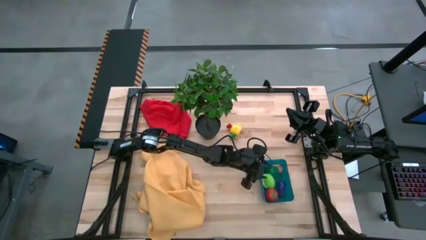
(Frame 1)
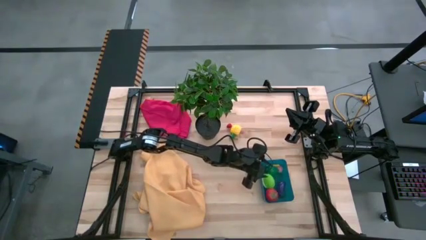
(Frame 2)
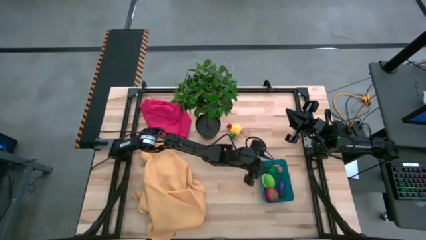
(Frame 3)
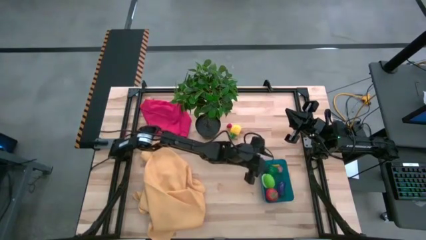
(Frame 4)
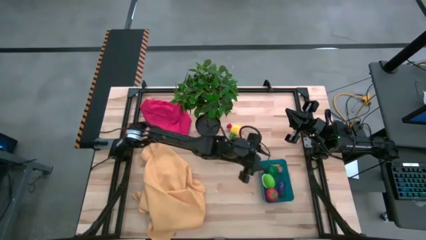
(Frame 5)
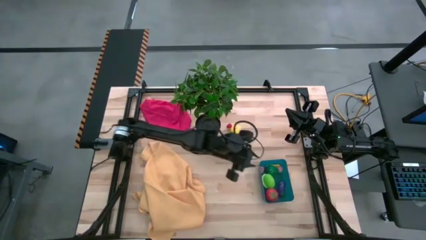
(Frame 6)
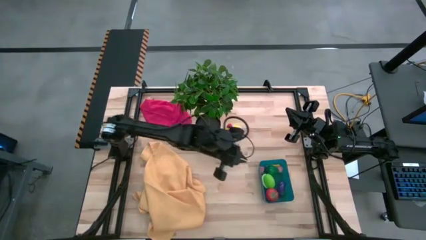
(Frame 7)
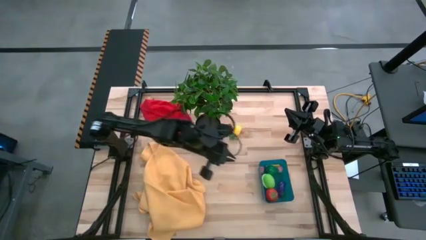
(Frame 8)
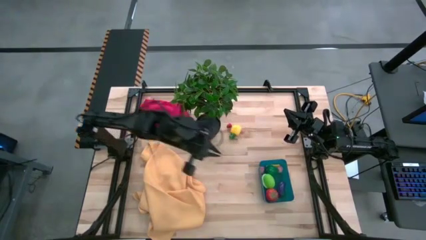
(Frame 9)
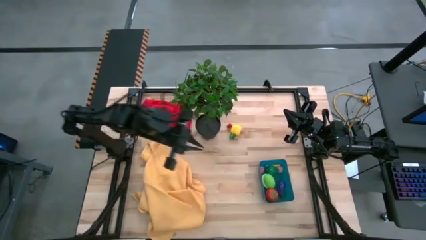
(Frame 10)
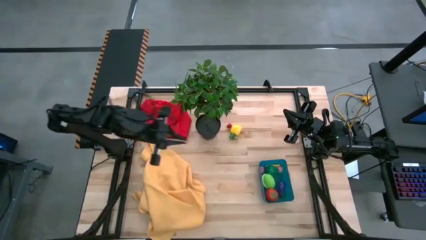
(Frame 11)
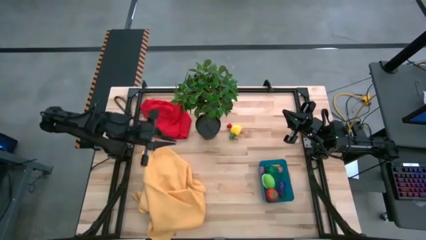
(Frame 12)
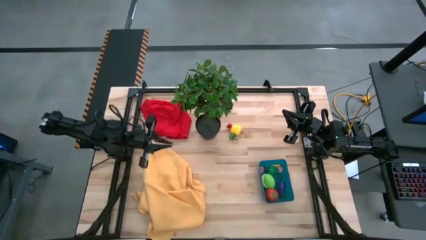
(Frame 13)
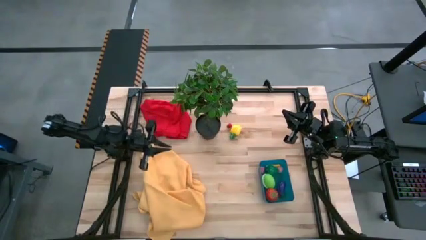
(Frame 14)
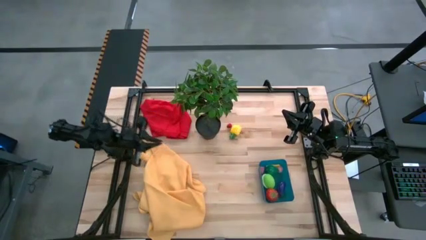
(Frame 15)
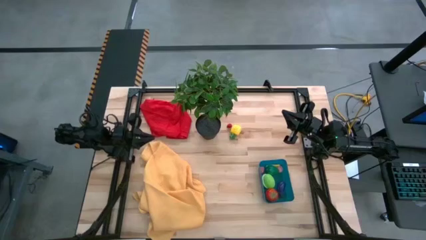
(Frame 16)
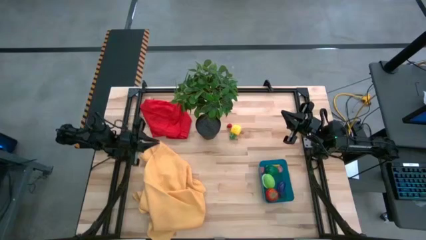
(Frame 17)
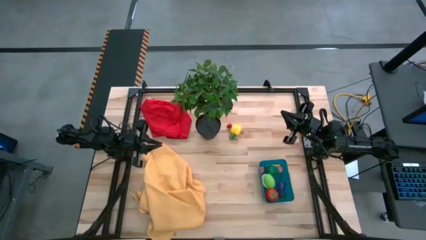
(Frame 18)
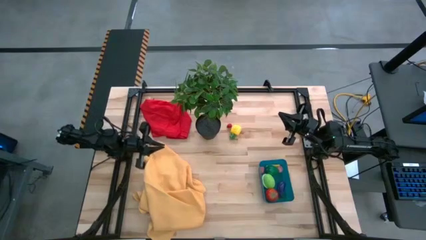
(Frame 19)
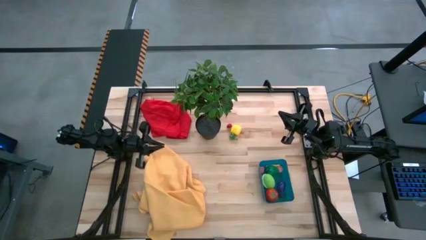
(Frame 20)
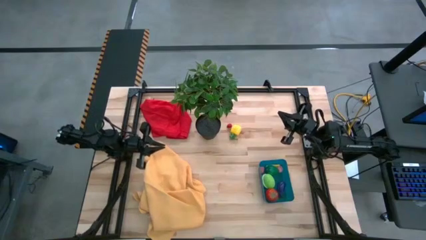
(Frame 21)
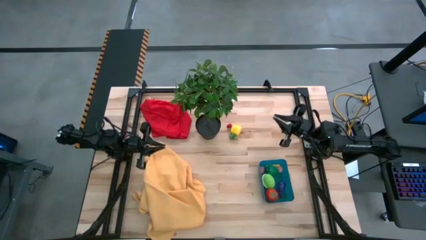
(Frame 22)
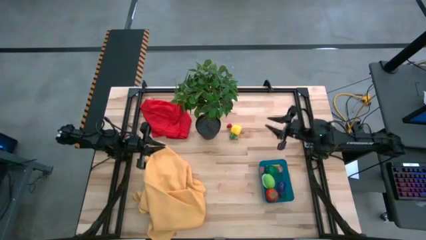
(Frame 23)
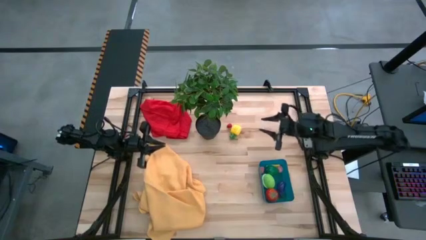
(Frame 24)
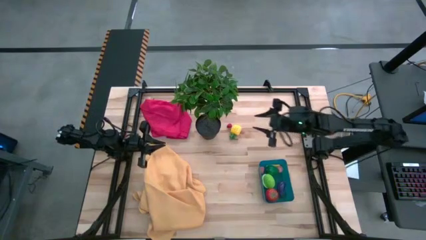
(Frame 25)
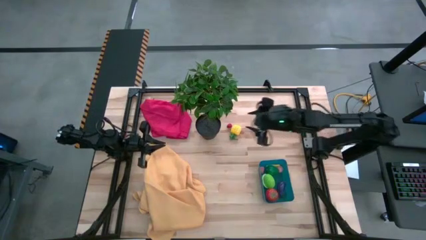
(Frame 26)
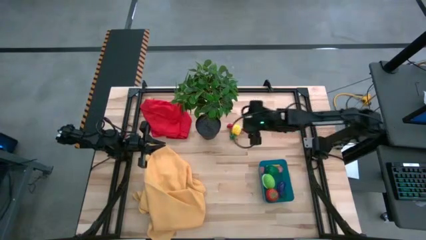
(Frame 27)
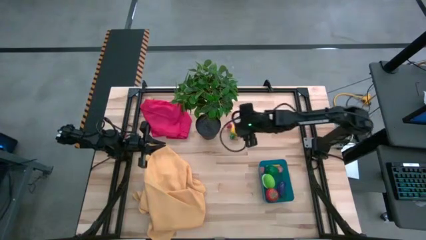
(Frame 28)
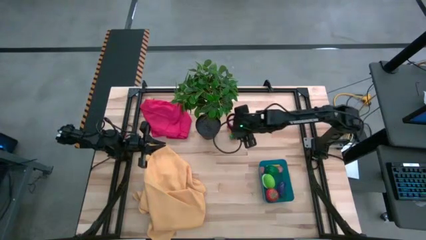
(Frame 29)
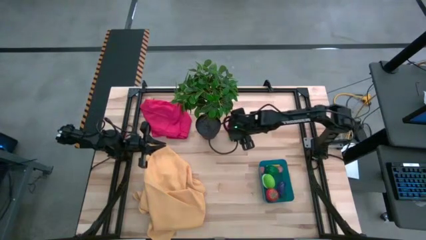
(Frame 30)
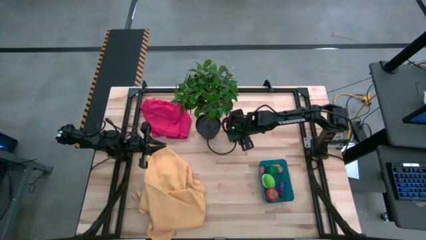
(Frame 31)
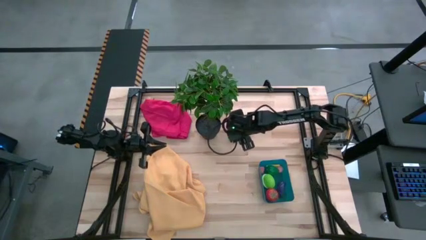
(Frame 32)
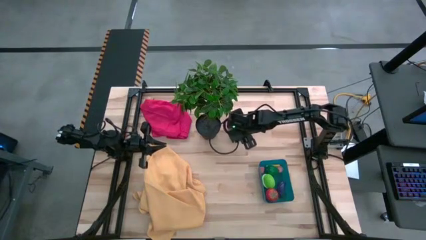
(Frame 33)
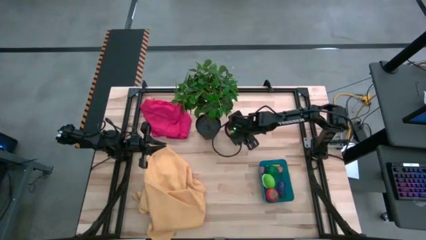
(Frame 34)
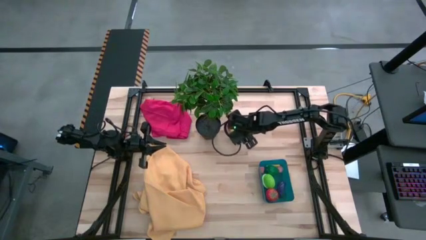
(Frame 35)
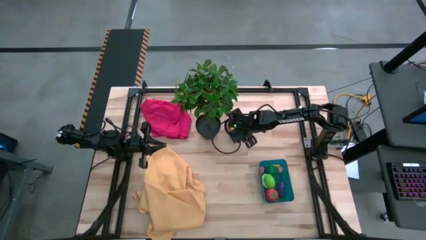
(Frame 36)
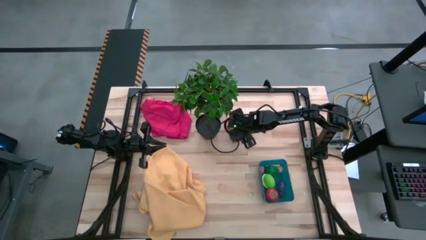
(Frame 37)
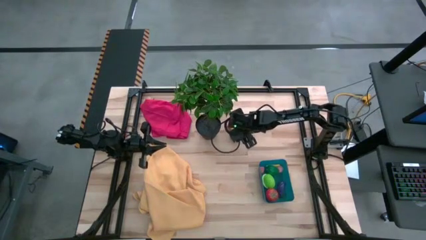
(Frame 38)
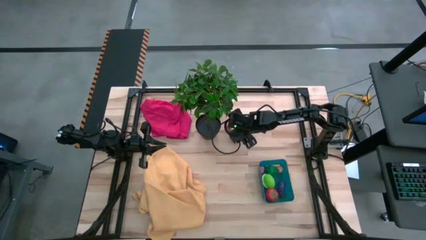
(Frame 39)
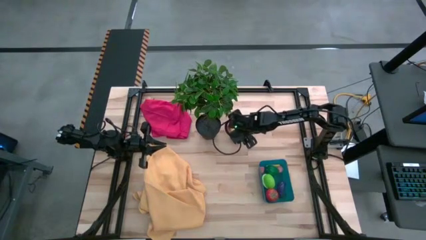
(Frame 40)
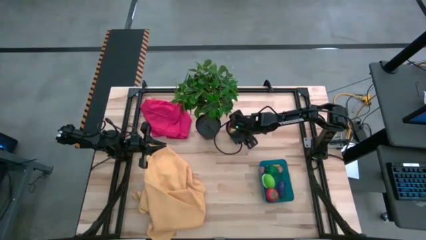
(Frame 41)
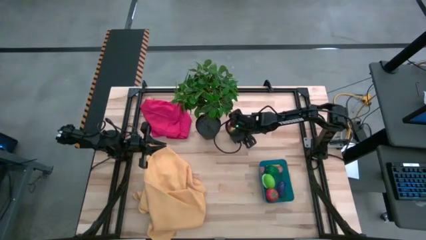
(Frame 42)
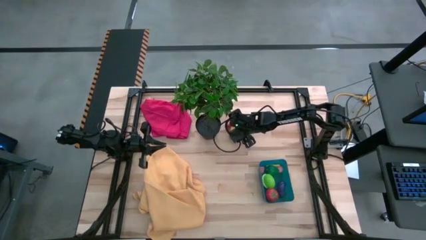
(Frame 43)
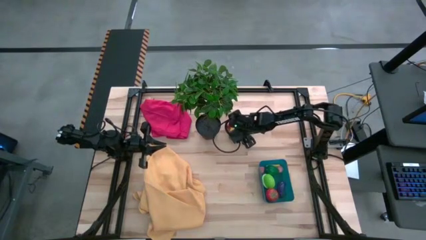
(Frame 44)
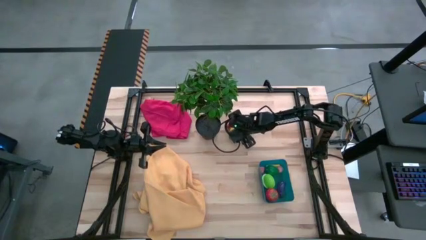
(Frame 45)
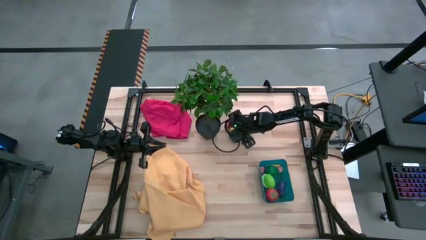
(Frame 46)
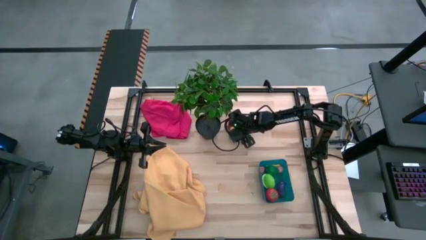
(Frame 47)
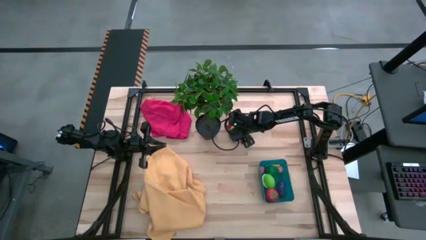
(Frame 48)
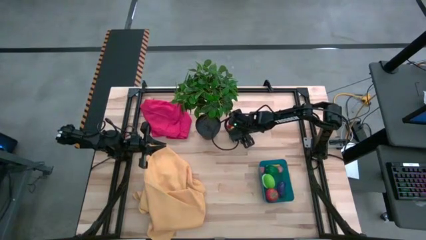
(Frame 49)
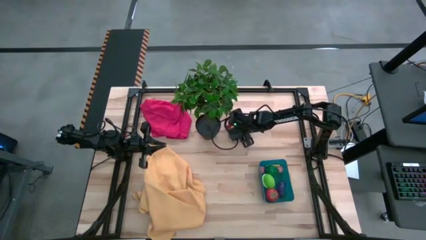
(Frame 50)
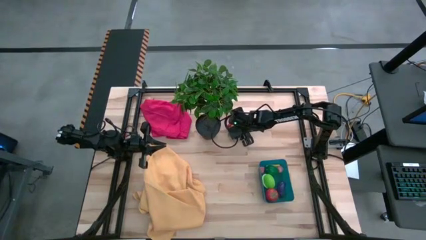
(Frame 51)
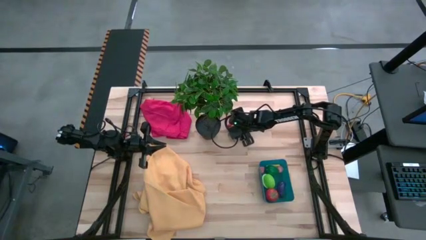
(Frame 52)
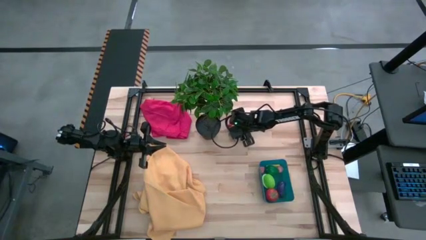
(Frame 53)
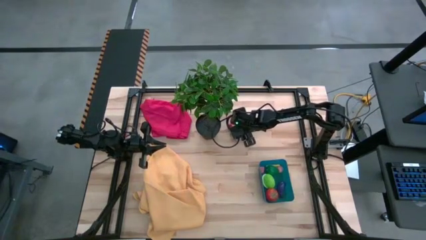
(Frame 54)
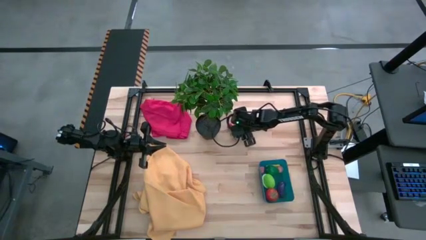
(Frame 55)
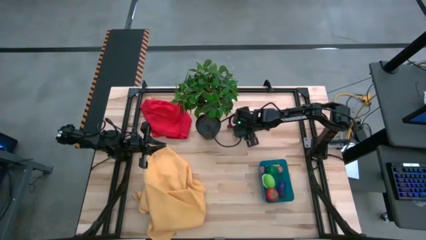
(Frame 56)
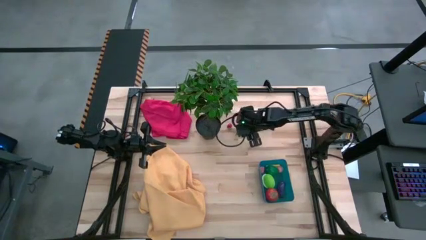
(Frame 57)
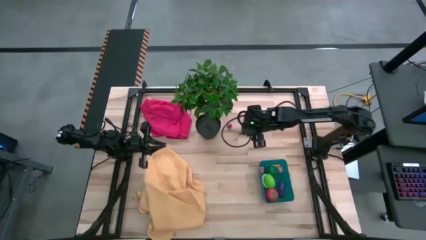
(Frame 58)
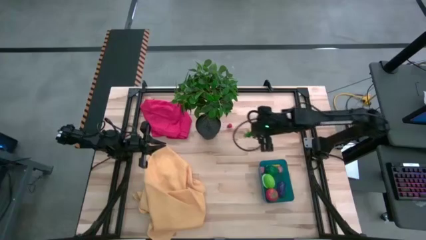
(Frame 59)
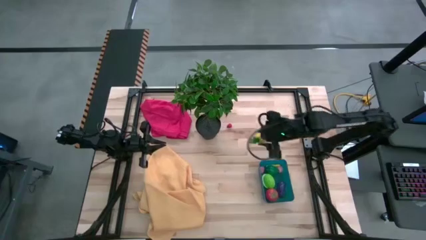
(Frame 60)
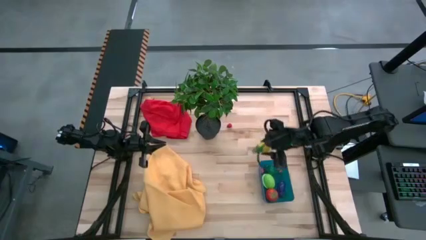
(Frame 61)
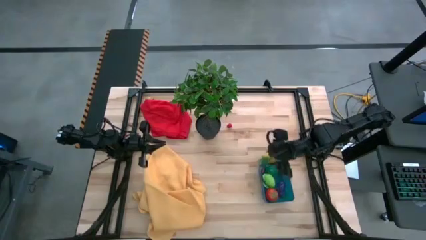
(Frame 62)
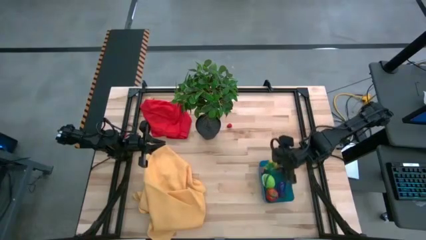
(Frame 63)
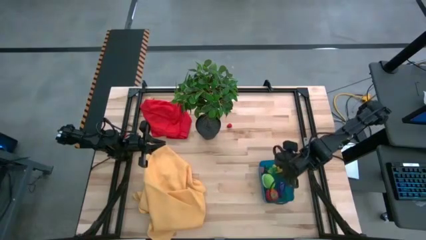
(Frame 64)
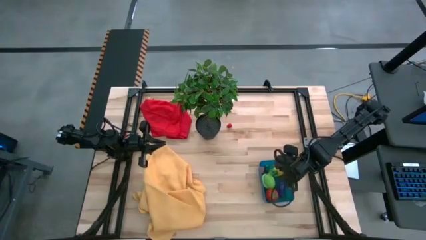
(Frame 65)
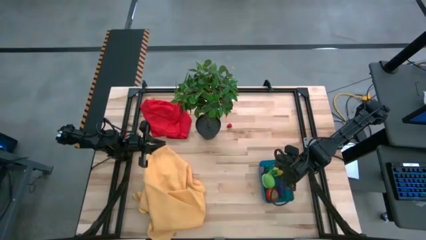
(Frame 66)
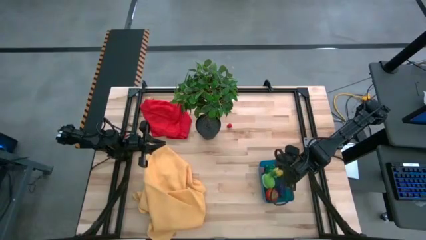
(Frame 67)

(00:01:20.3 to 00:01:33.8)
Task: Pick and placing Produce into tupperware
Put the pineapple into the bin
